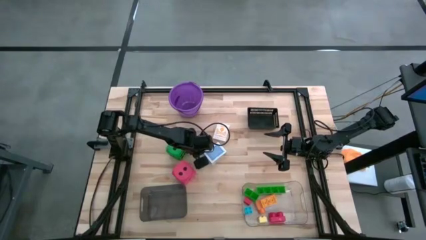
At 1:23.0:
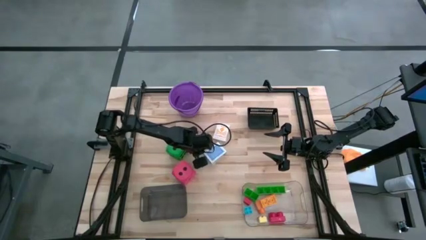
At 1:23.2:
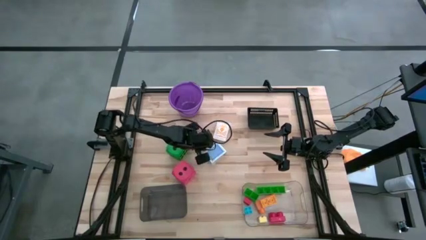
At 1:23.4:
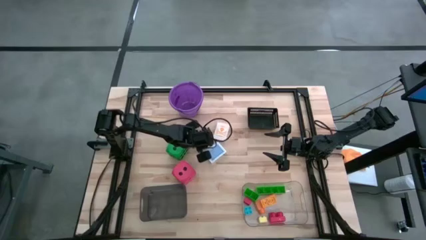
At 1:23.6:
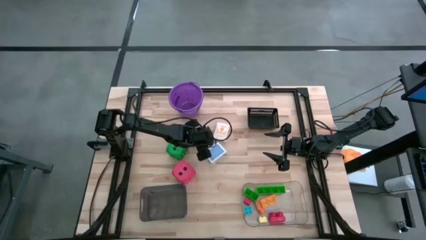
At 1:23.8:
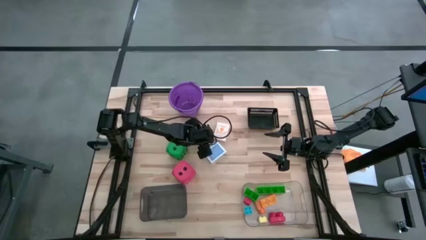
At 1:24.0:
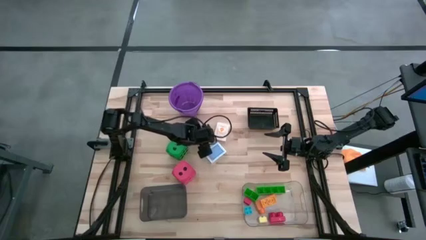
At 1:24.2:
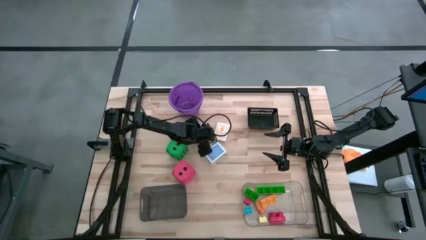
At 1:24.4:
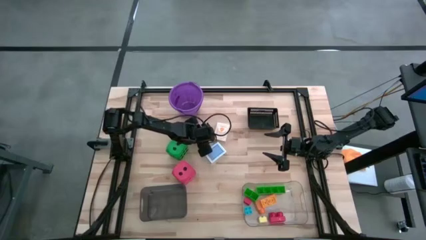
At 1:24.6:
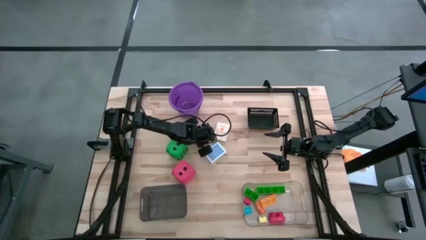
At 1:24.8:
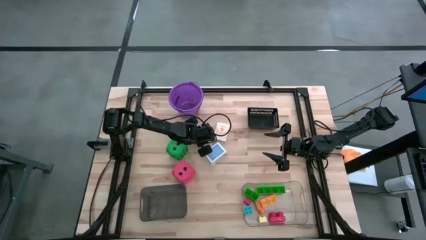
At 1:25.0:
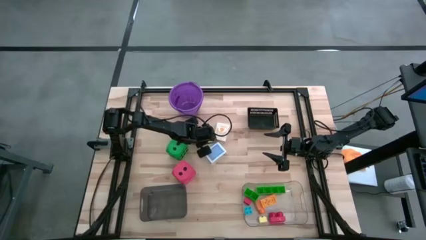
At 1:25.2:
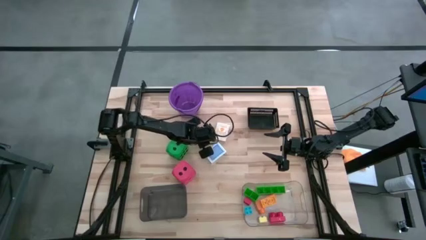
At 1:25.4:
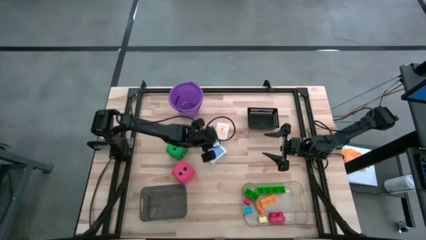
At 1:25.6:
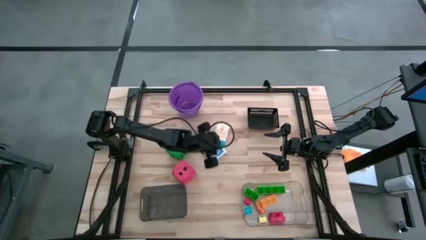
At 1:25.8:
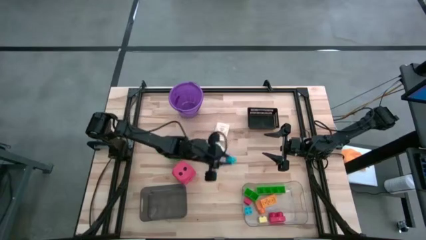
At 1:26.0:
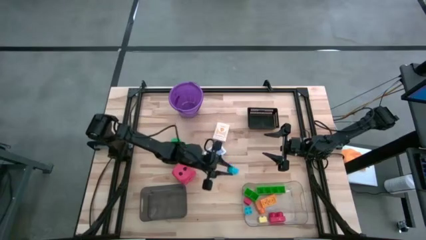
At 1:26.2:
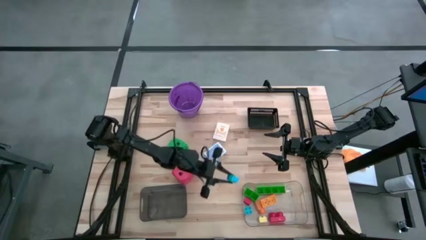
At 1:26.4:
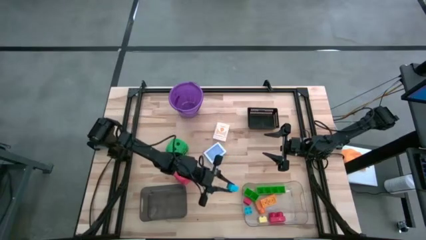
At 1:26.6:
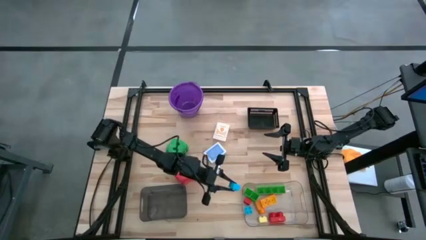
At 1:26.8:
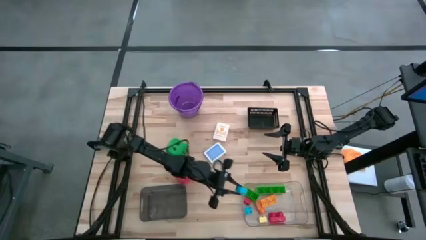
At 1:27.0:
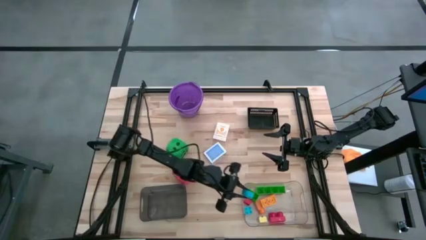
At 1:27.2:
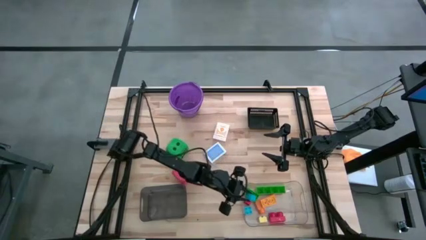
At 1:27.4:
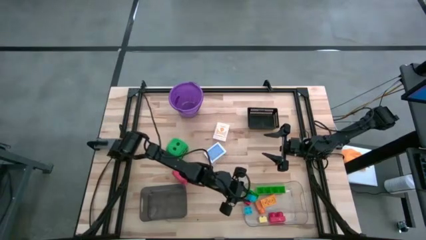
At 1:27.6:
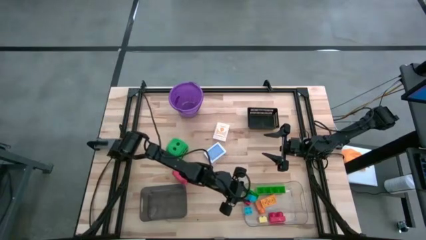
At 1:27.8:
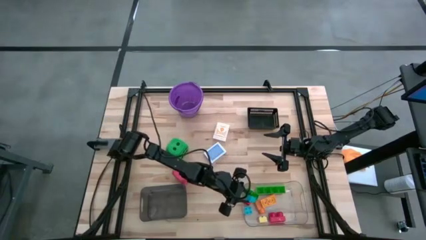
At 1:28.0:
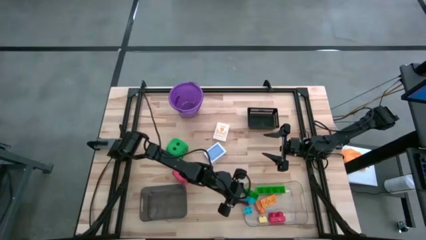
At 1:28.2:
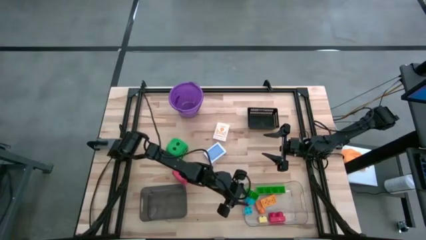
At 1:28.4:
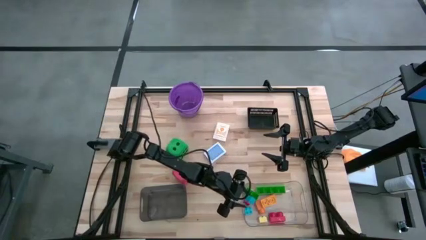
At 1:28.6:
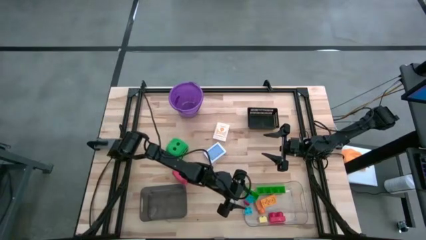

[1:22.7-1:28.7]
Task: Pick & Place Toys
Put the small blue game piece into the transparent bin

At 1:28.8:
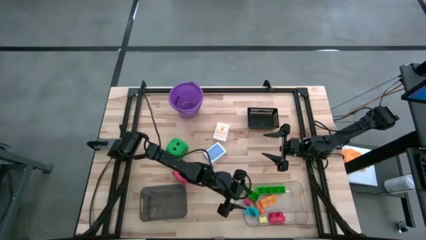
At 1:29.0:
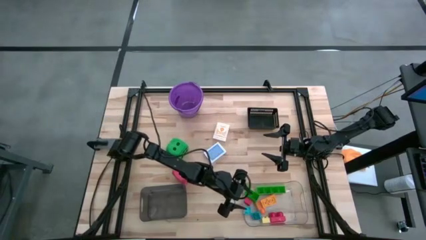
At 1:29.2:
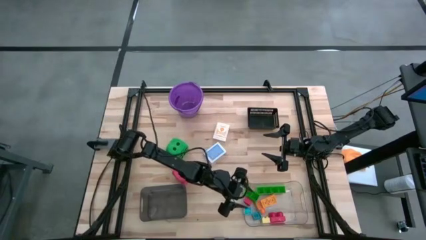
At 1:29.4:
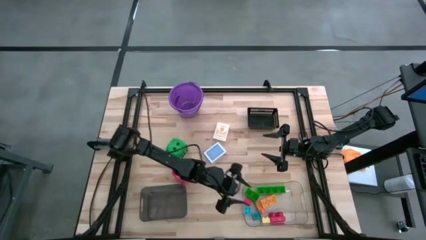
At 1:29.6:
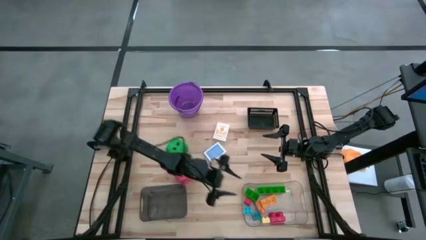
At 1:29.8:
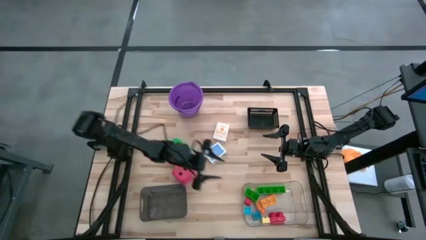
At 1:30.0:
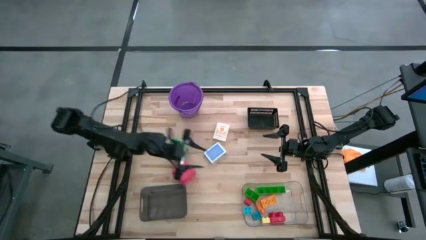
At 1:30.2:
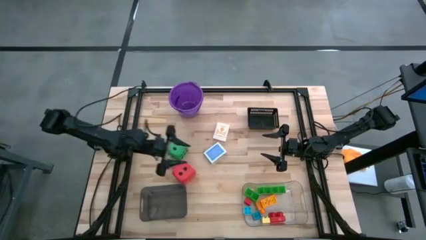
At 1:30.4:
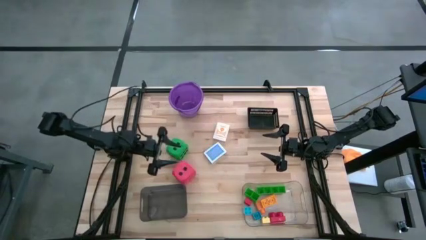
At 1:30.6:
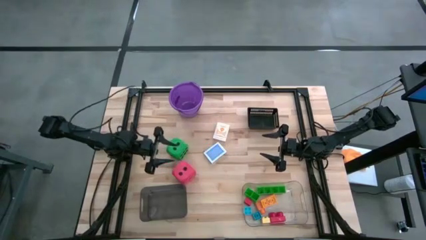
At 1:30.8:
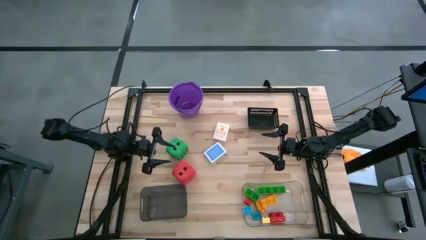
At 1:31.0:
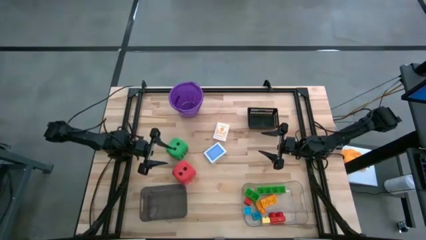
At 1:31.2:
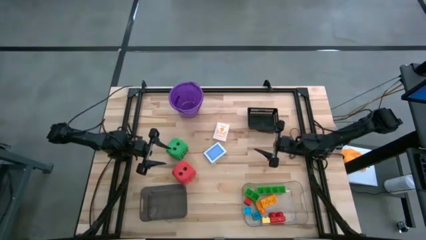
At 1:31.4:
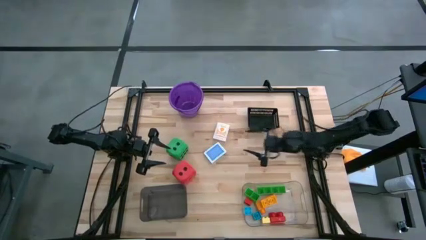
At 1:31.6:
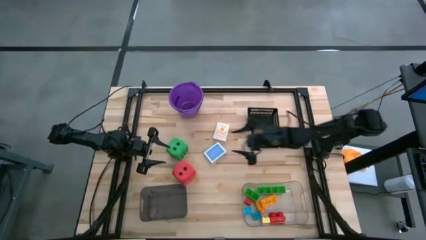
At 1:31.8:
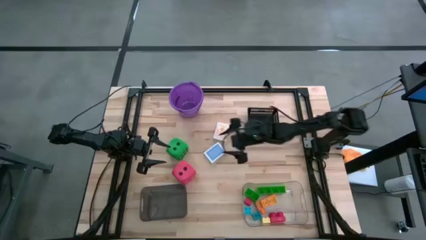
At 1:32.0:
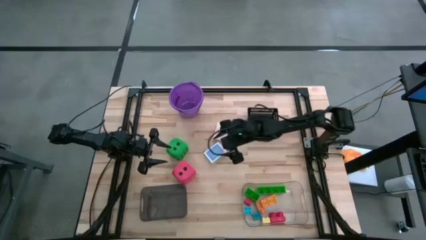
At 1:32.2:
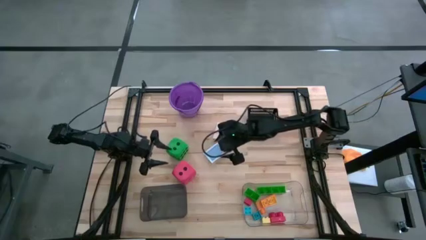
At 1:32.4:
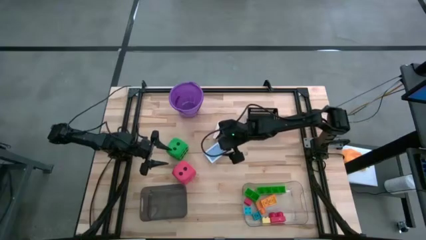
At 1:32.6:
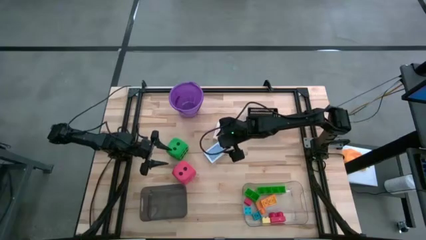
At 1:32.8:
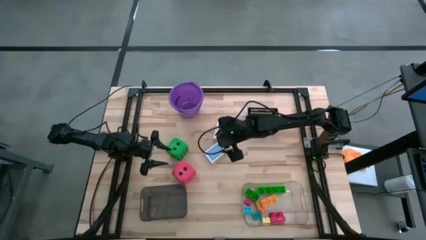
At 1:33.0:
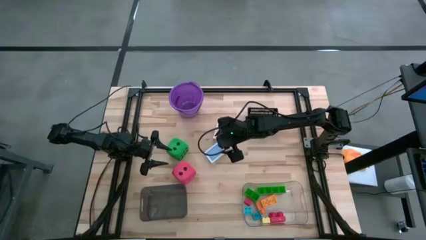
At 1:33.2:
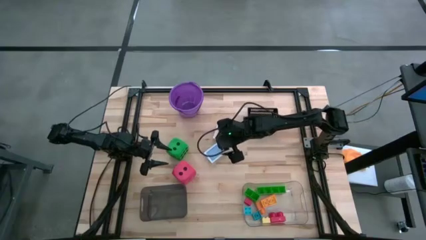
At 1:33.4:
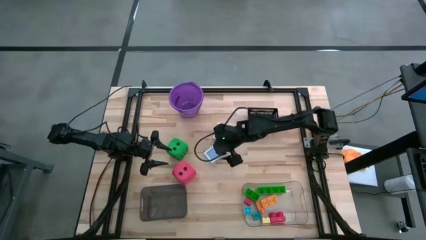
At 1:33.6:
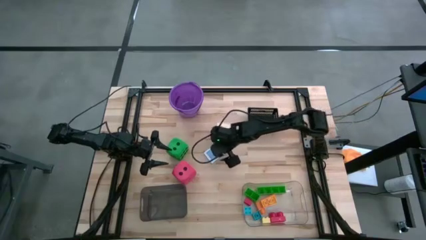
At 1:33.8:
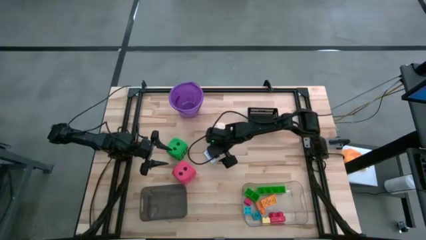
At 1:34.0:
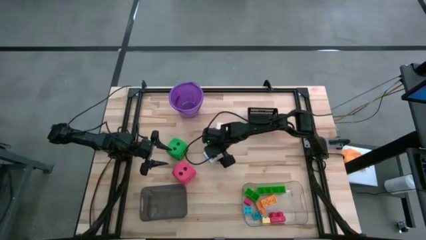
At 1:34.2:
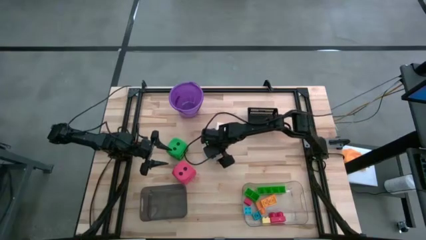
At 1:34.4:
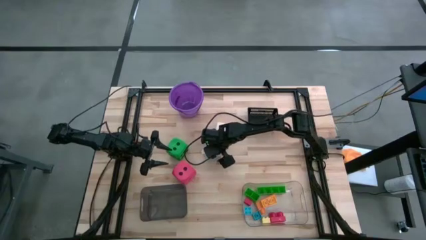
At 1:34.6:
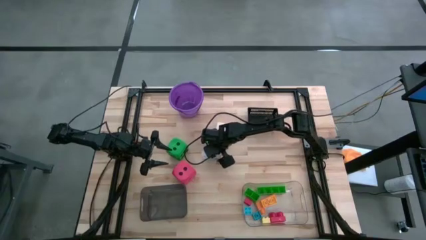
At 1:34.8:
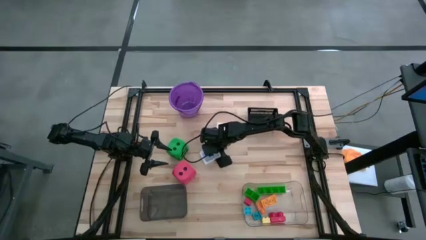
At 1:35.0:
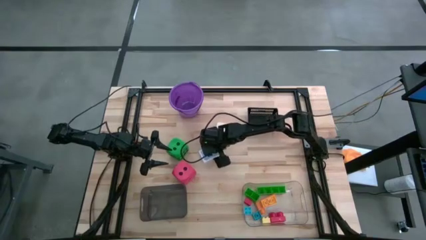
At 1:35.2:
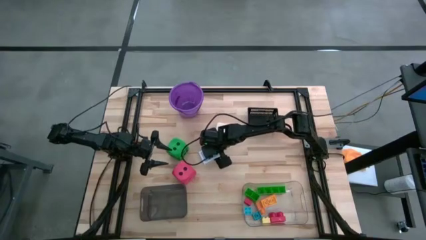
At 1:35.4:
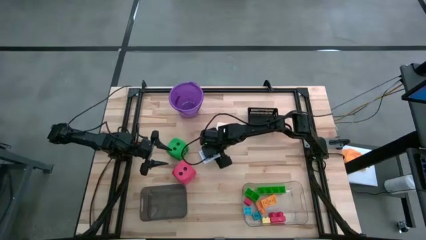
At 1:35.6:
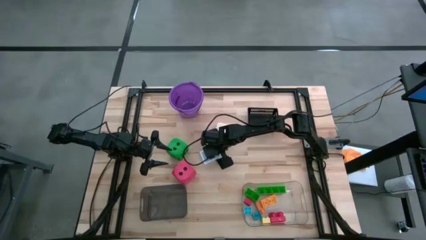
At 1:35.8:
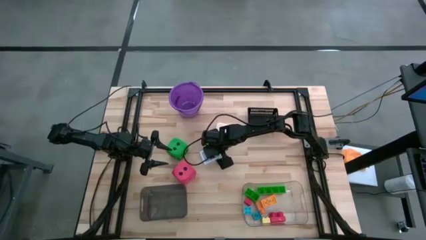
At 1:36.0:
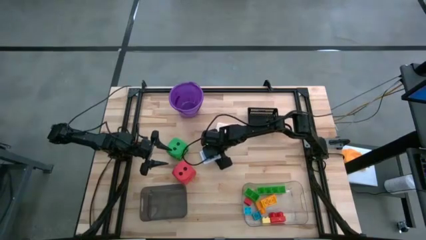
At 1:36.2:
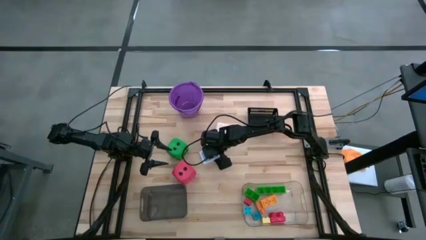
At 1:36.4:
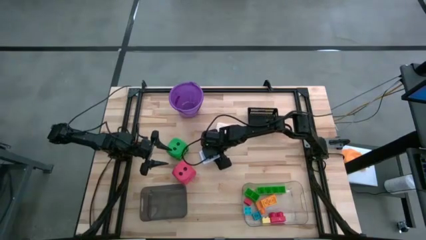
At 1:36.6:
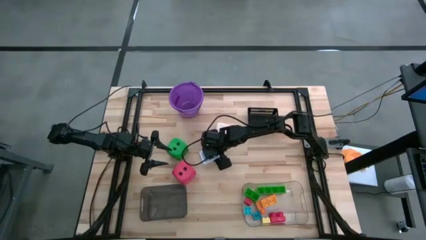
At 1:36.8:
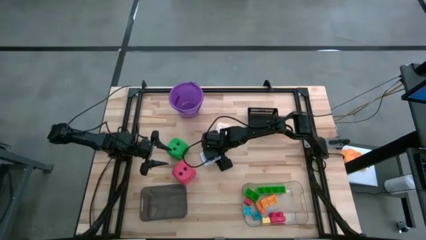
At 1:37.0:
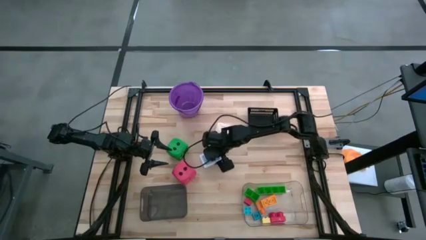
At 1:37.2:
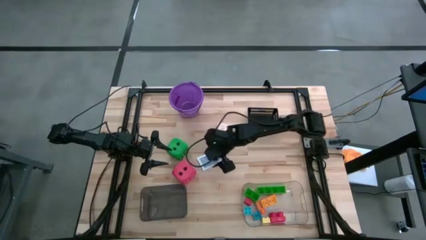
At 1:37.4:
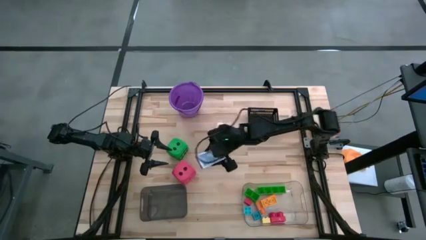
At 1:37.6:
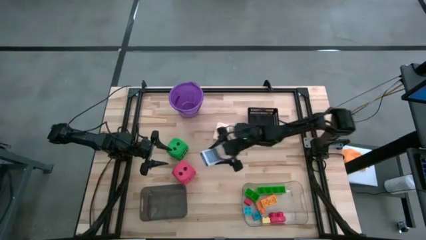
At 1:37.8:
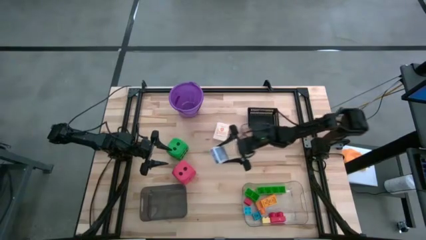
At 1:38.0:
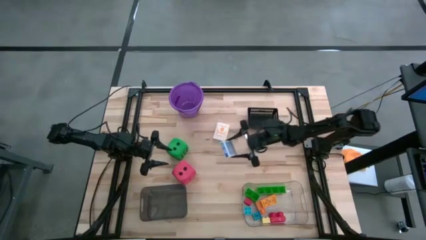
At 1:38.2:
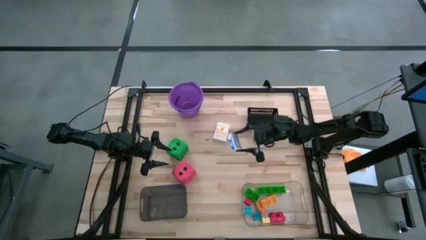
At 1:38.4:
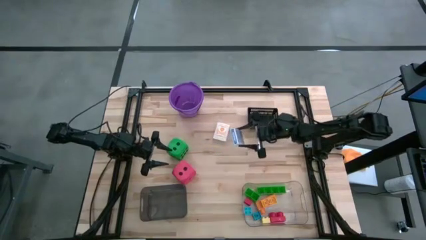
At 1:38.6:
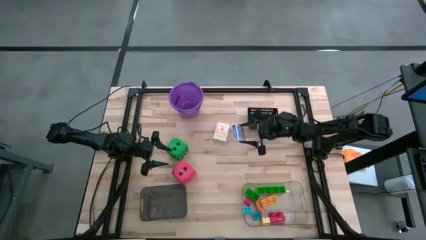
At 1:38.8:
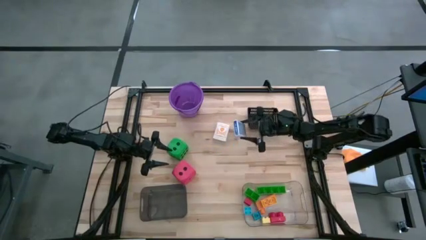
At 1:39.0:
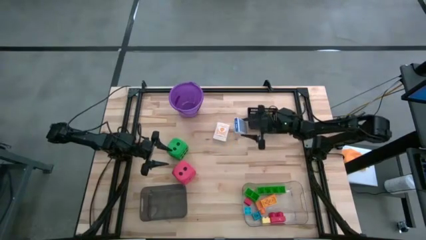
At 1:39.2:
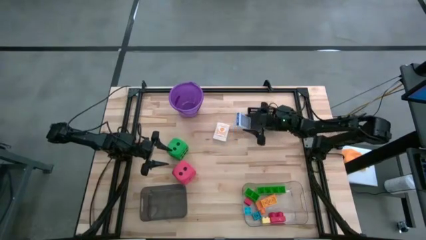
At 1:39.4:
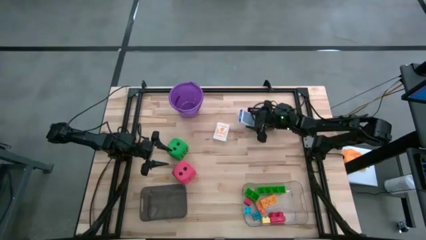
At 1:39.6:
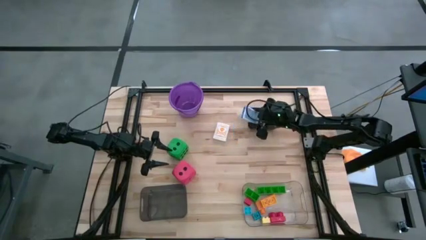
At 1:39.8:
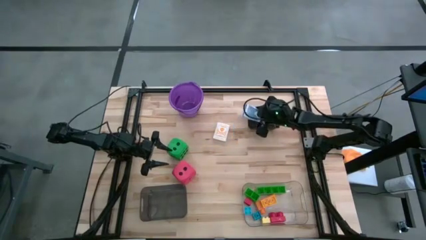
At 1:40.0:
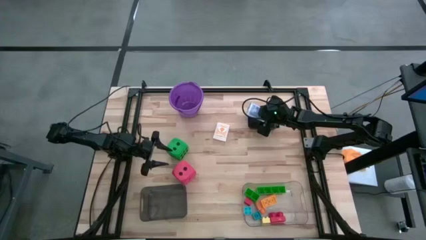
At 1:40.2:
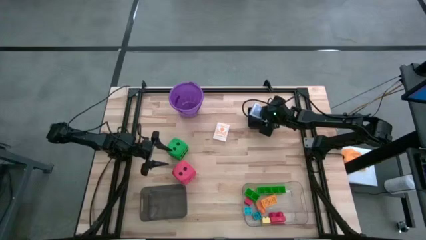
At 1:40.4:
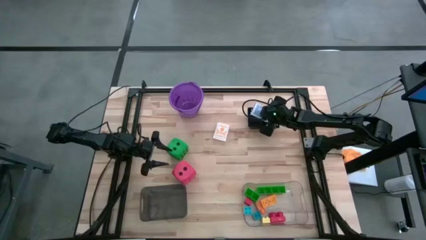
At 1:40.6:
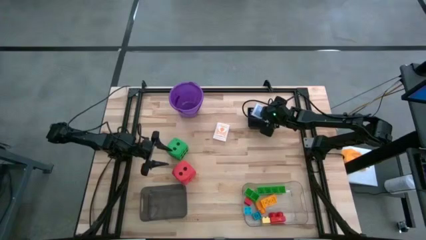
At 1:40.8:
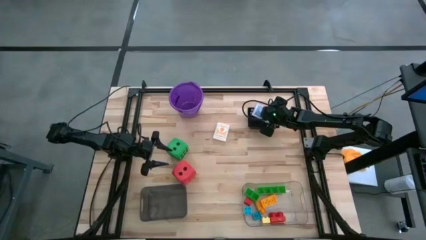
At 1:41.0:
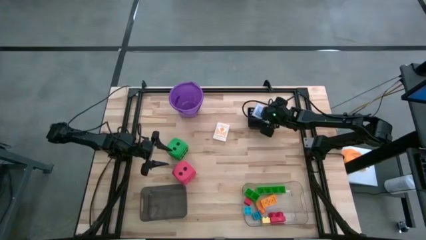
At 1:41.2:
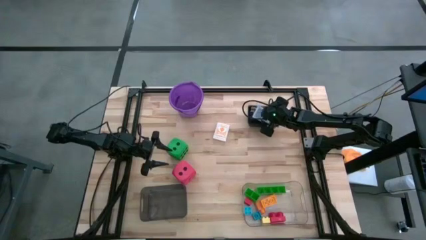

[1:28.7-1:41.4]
Put the blue deck of cards into the black basket
